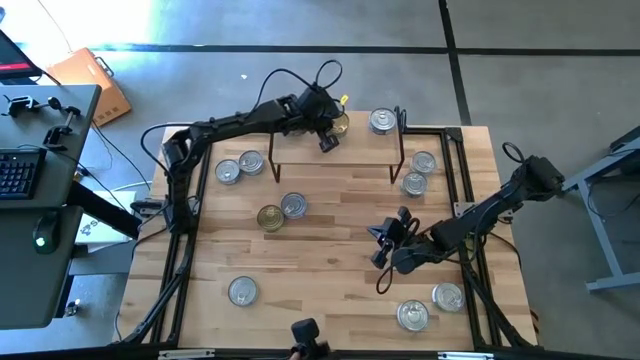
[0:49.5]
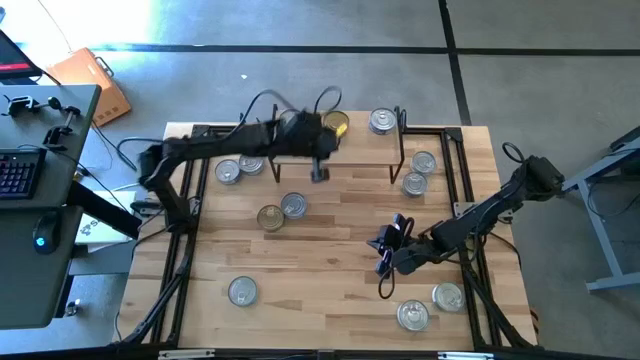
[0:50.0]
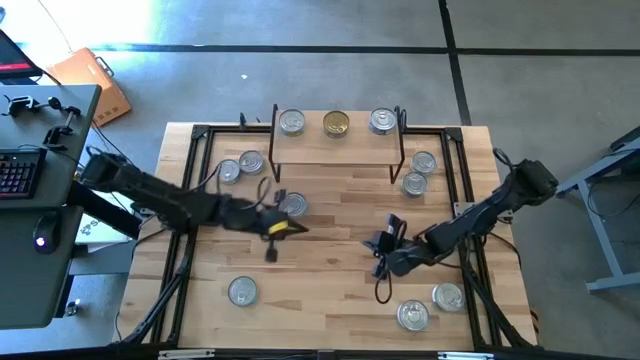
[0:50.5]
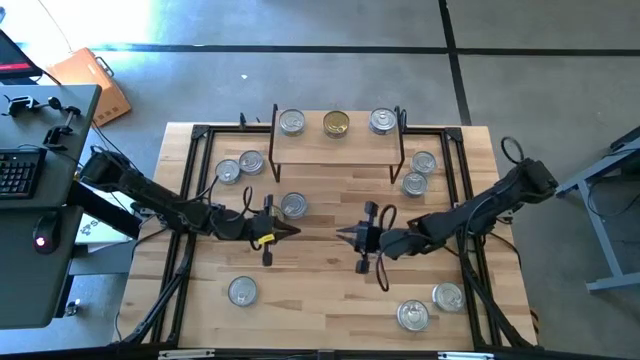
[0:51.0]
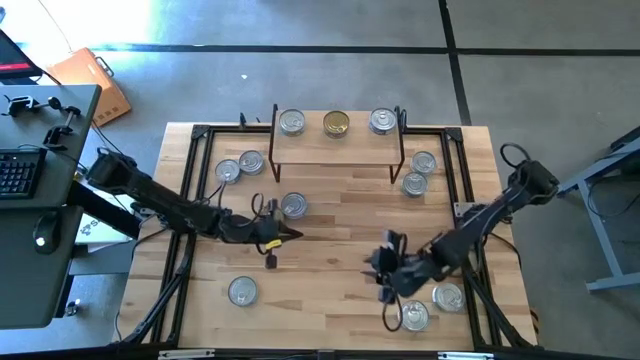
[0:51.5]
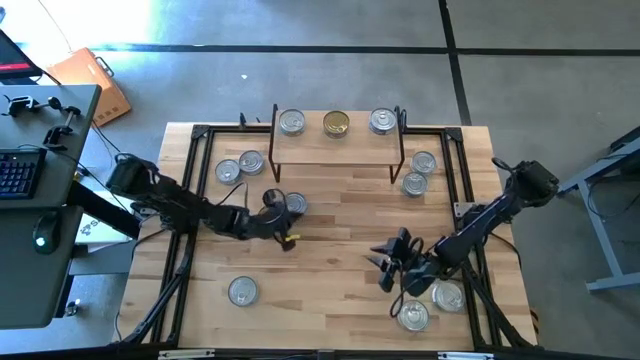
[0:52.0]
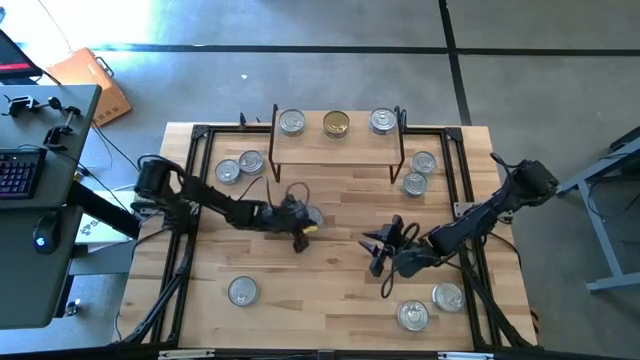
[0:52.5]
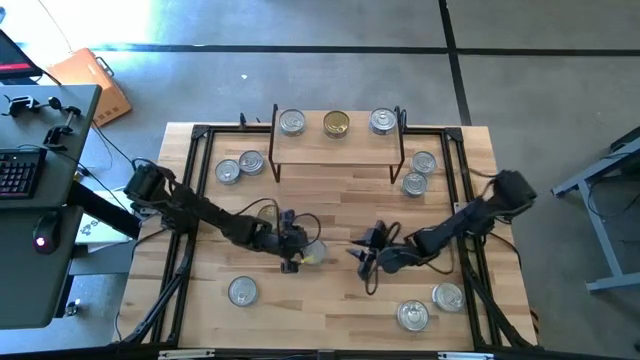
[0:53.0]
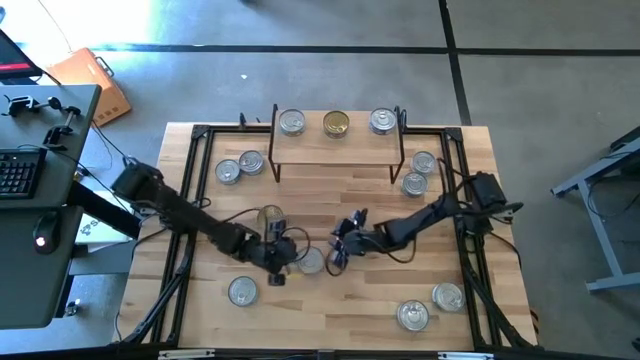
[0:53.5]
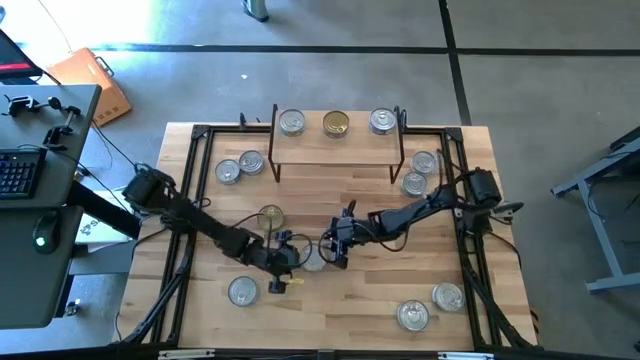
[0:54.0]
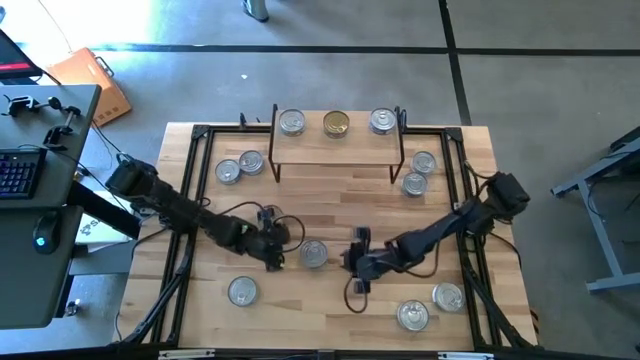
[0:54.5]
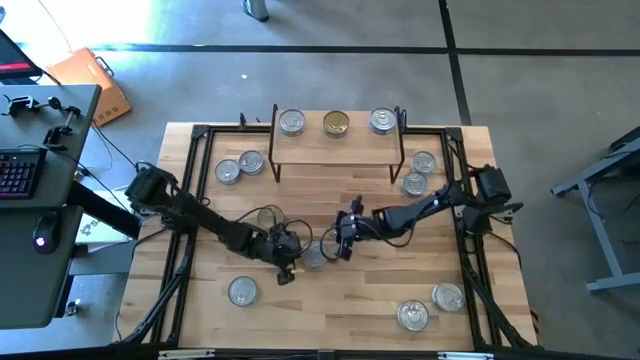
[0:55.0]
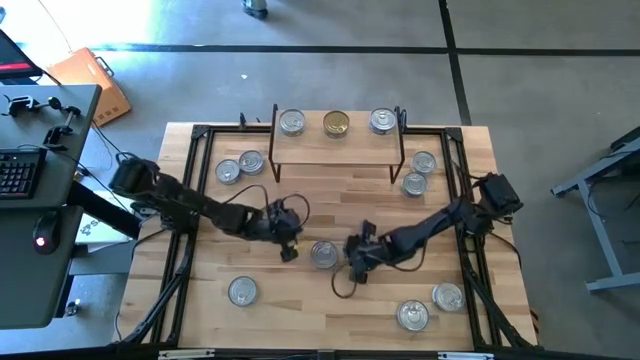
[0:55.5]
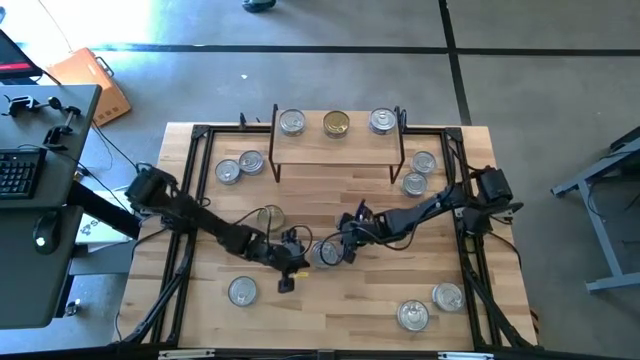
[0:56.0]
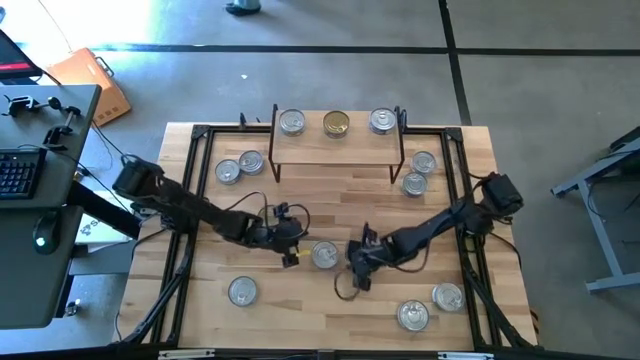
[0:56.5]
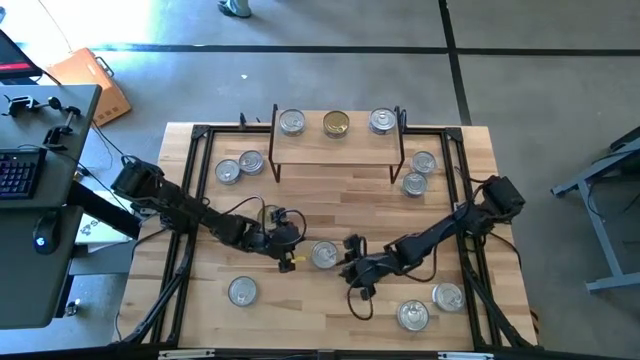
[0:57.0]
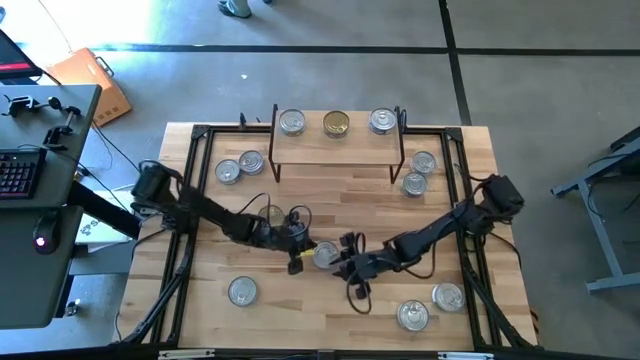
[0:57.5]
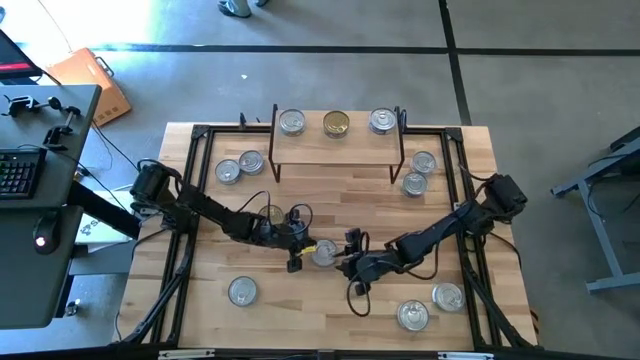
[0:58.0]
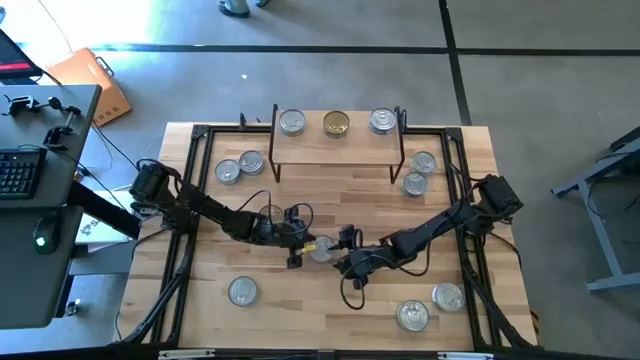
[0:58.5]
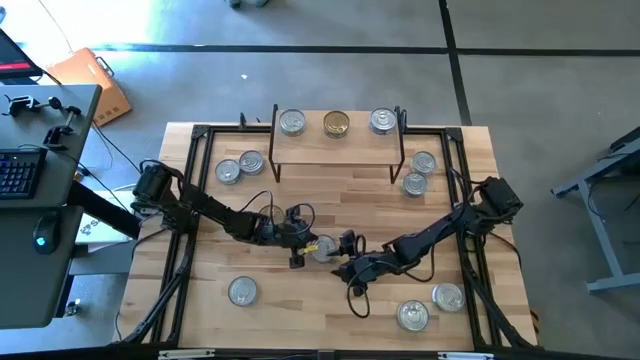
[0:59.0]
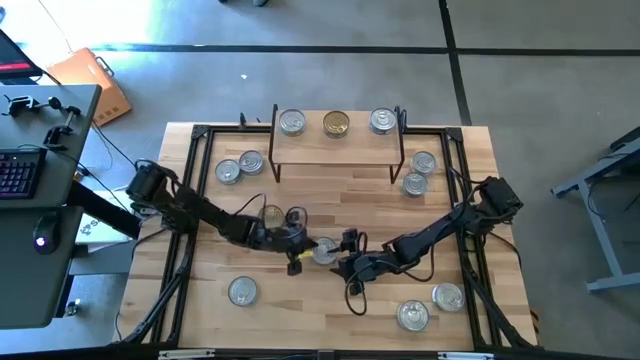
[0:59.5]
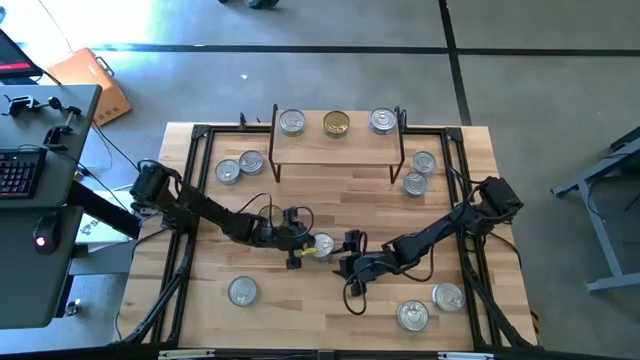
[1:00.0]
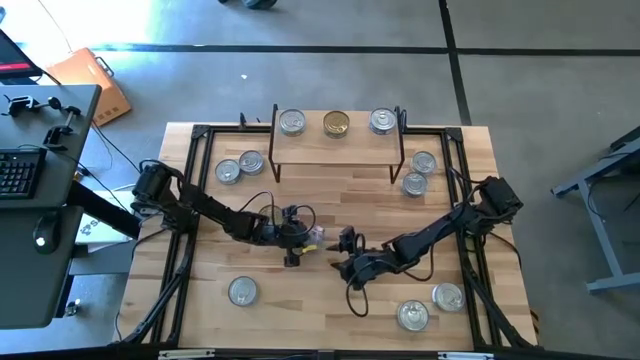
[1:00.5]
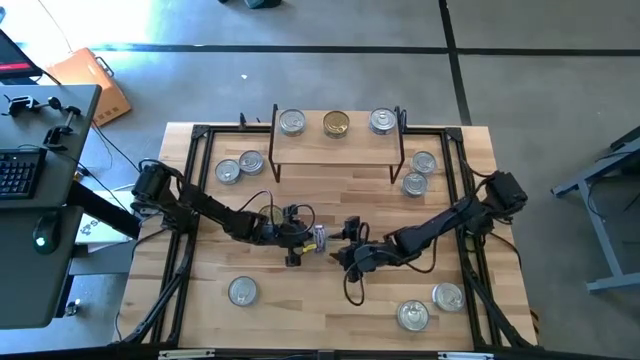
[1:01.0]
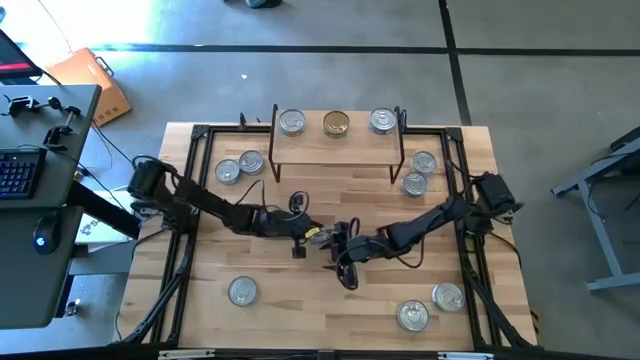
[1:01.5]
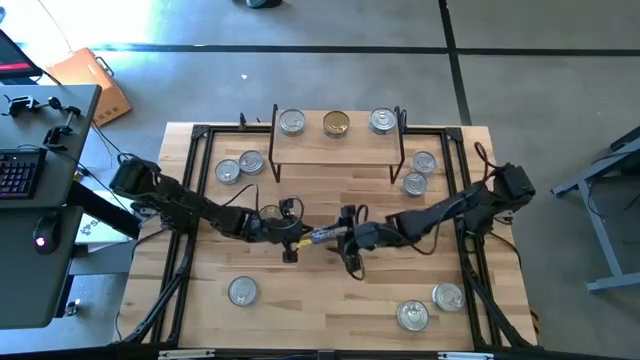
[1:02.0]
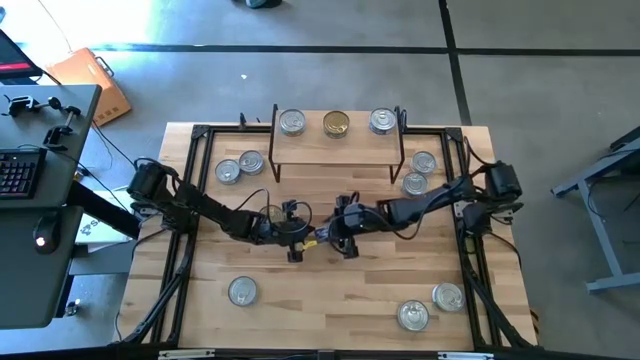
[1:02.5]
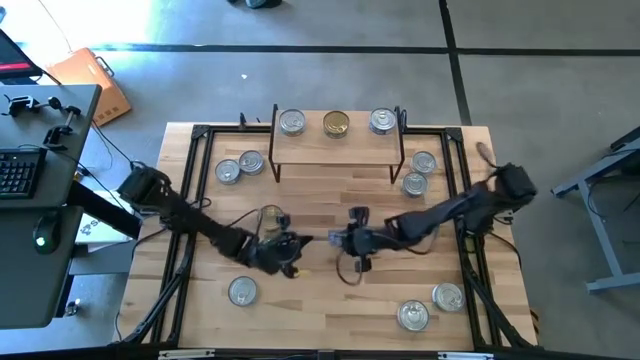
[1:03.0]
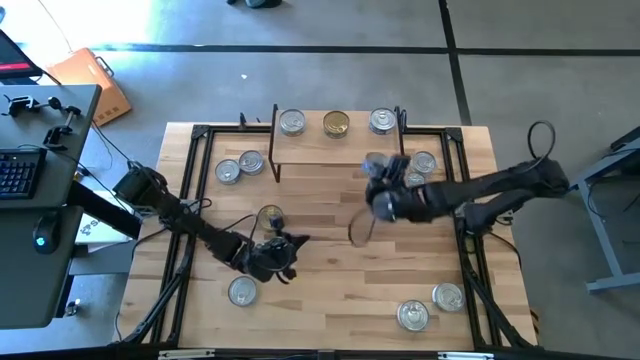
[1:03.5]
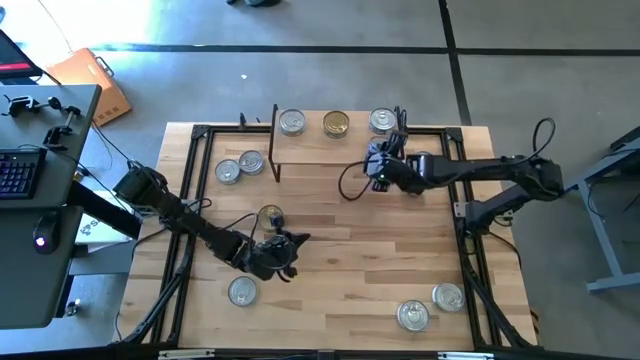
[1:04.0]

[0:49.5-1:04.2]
Task: Stack canned seafood by type on shelf
Put the blue tuna can and aligned with the other blue tuna can on the shelf

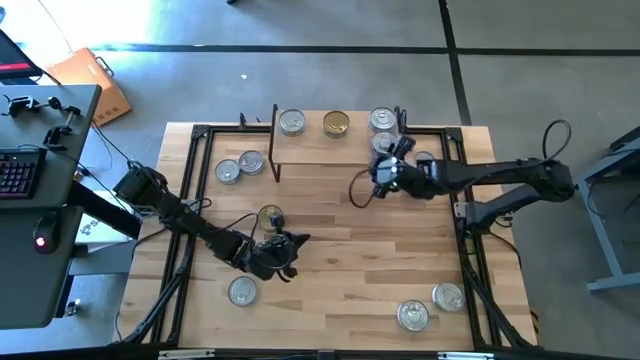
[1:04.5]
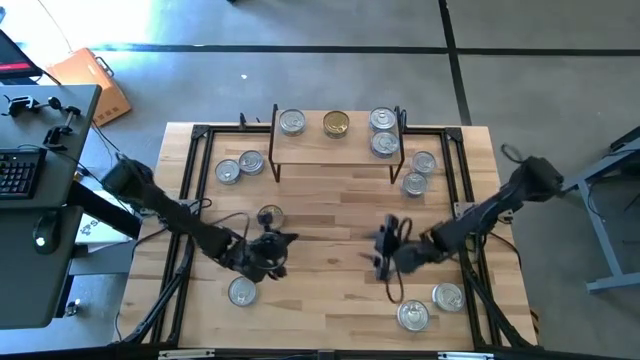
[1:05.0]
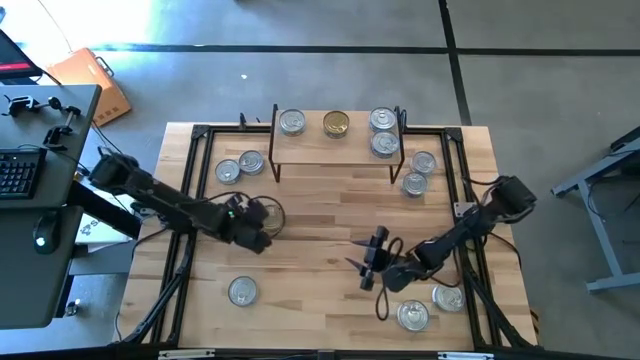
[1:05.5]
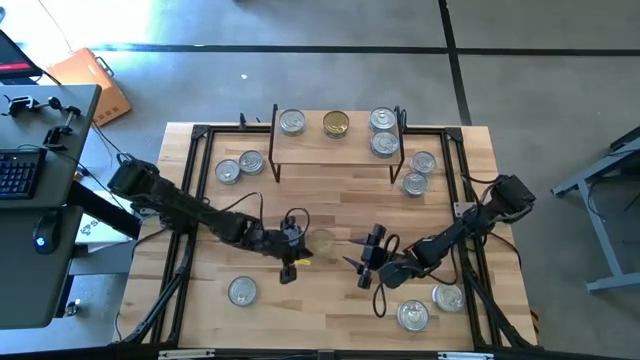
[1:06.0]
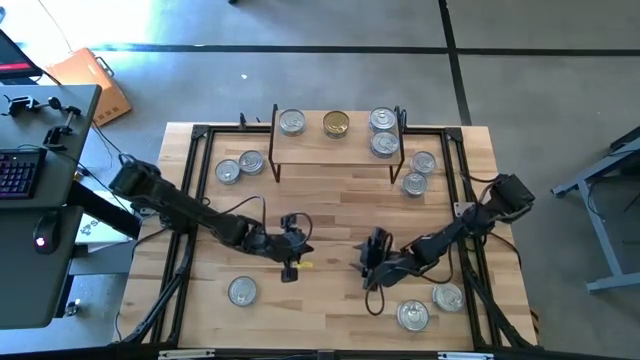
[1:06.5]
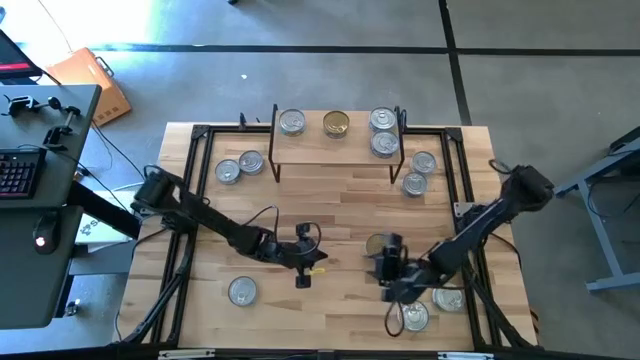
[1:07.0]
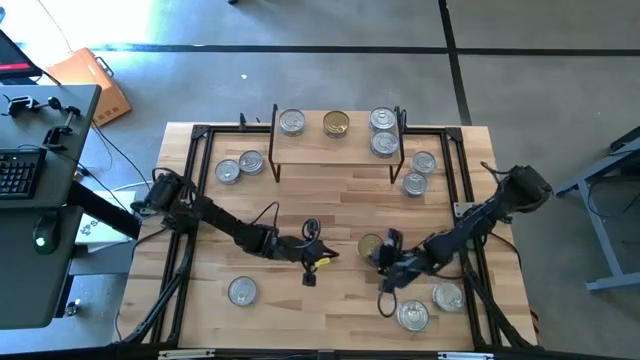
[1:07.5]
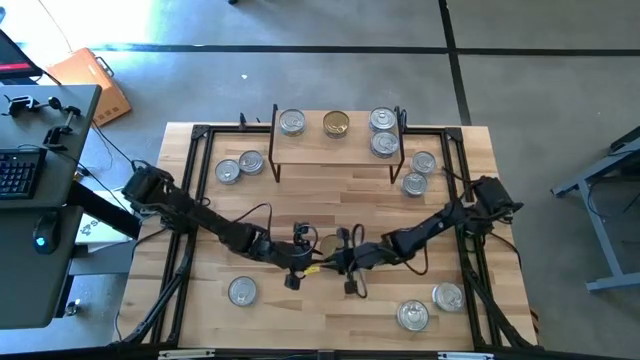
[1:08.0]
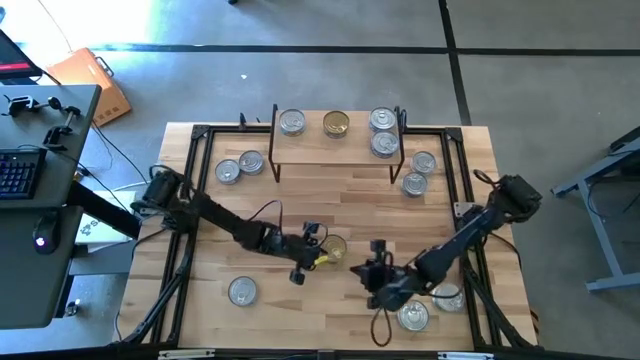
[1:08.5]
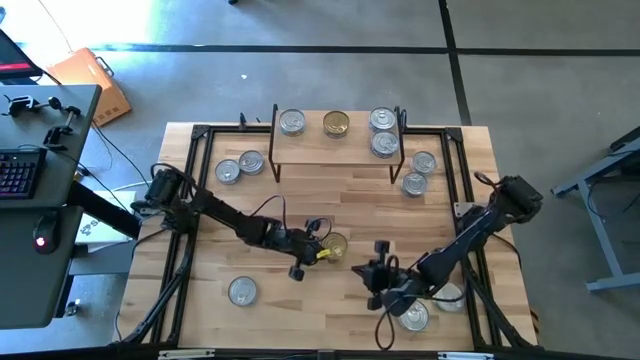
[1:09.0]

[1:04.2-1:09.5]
Put the green tuna can and aligned with the other green tuna can on the shelf

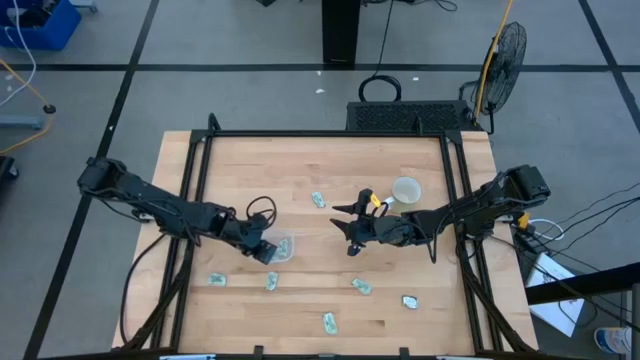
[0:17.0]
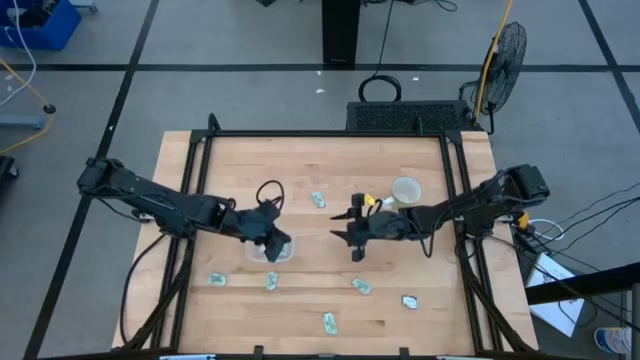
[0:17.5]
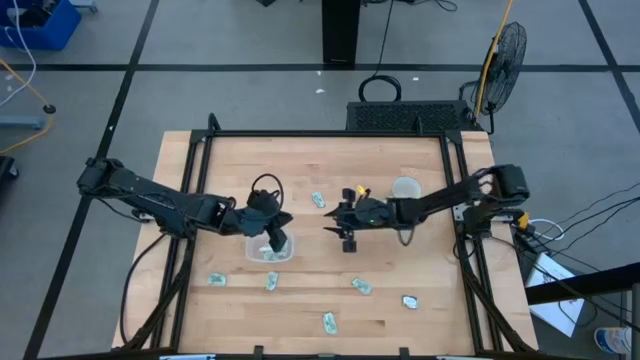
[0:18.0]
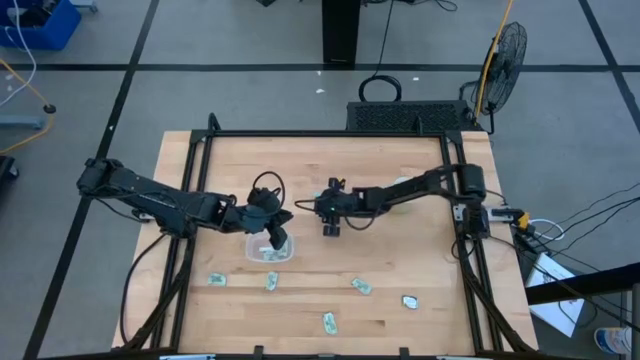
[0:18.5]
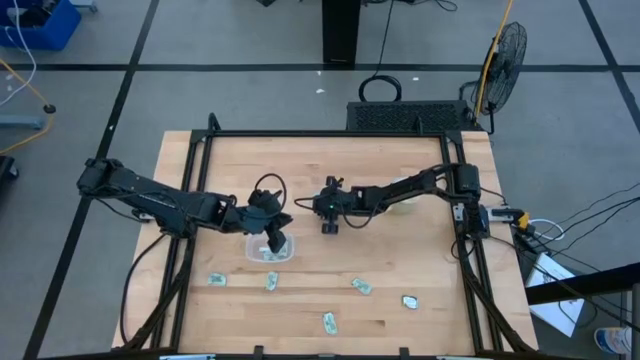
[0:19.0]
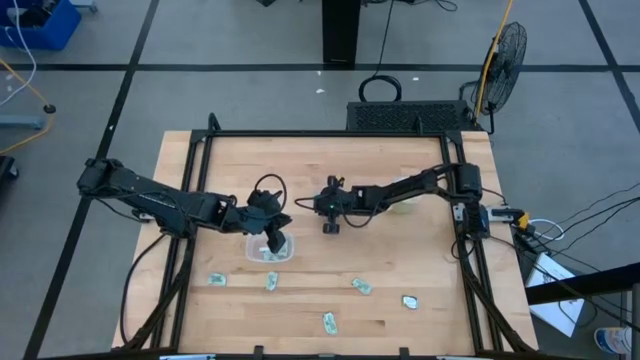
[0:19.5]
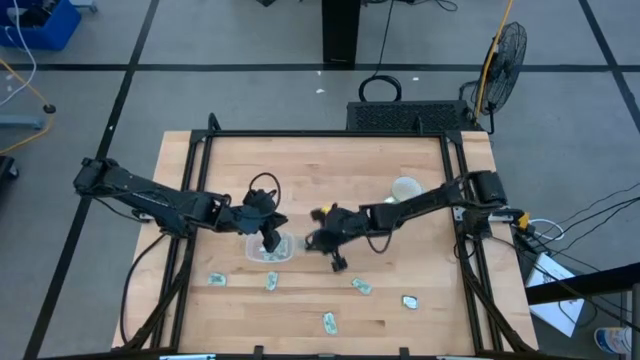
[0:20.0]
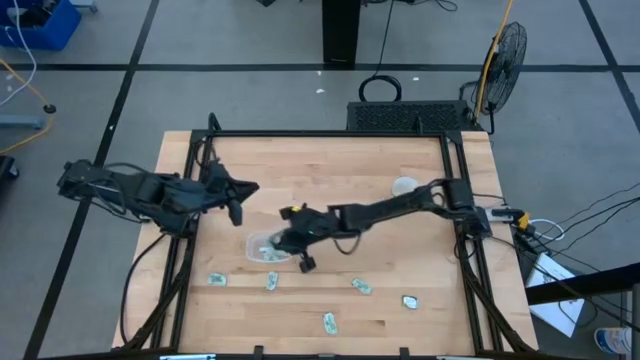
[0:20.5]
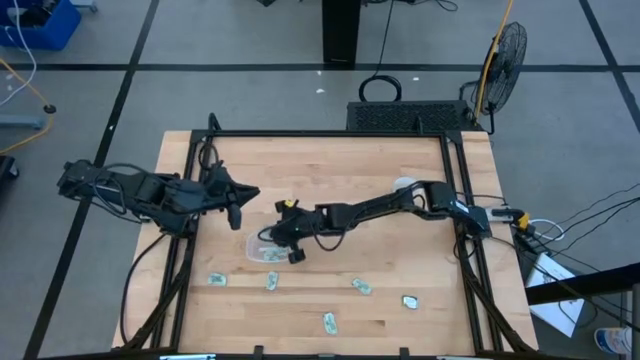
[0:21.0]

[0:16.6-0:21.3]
Task: Pick and place Stevia / Truvia into bins
Put the stevia packet into the transparent bin
